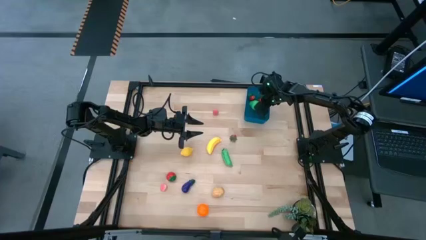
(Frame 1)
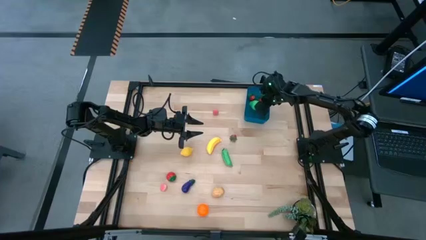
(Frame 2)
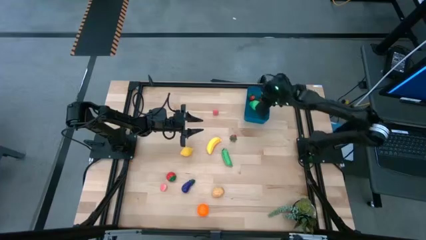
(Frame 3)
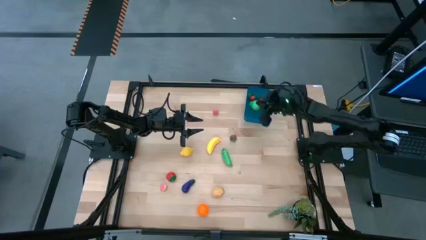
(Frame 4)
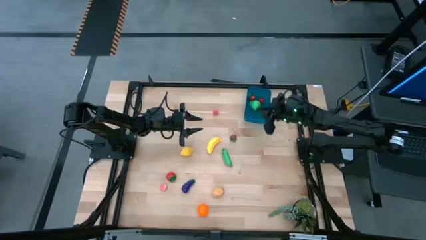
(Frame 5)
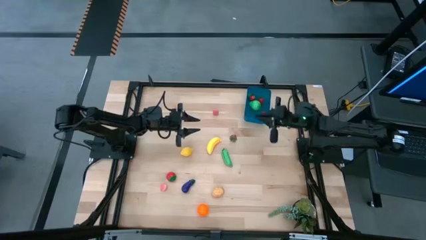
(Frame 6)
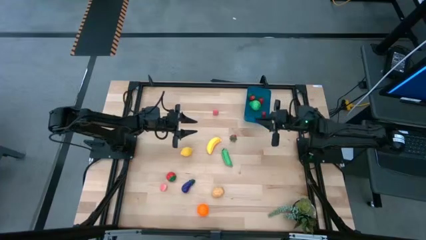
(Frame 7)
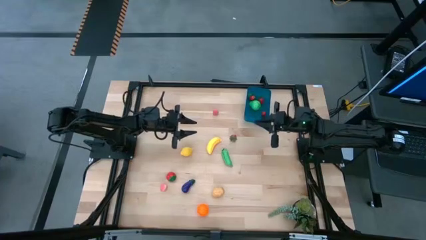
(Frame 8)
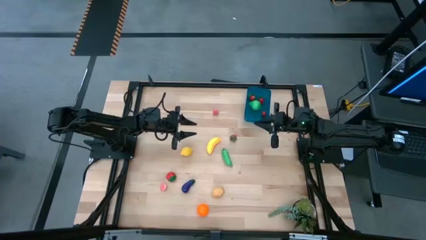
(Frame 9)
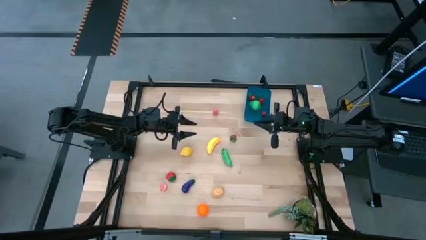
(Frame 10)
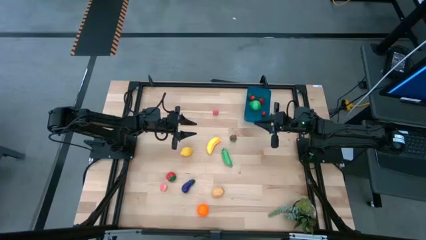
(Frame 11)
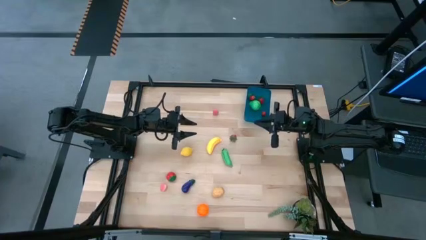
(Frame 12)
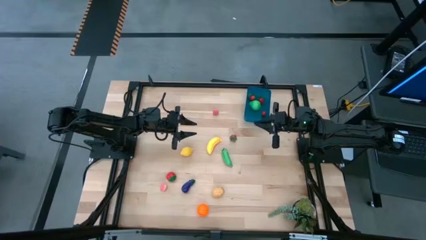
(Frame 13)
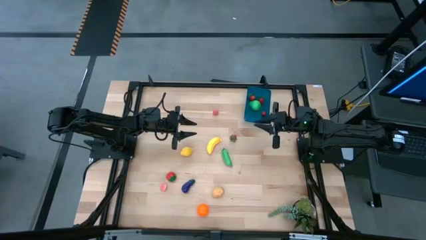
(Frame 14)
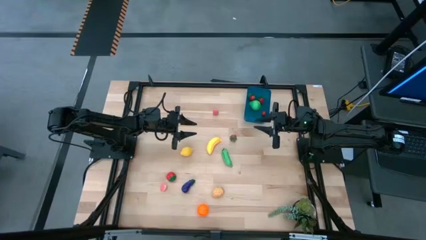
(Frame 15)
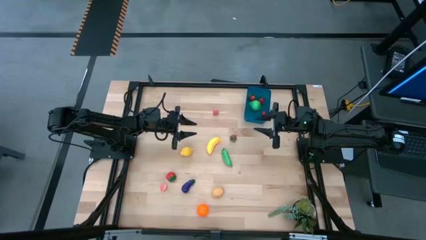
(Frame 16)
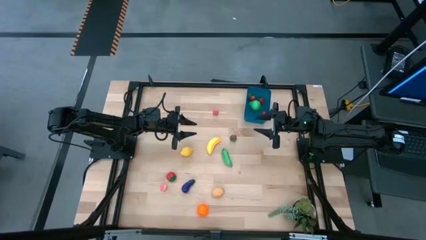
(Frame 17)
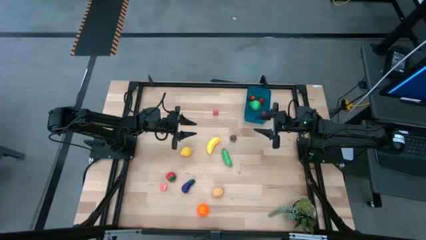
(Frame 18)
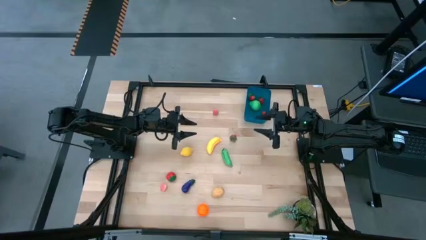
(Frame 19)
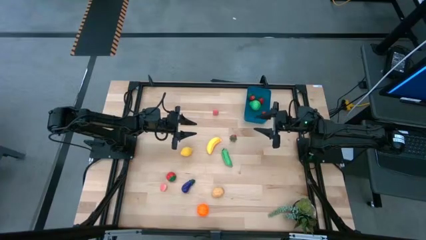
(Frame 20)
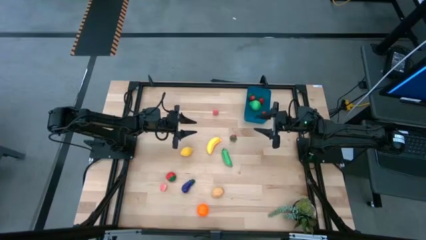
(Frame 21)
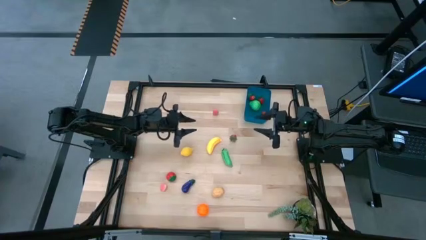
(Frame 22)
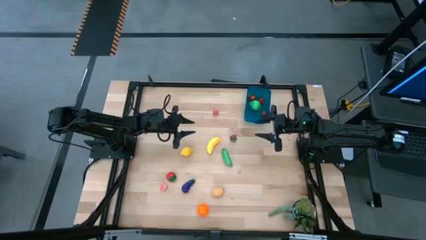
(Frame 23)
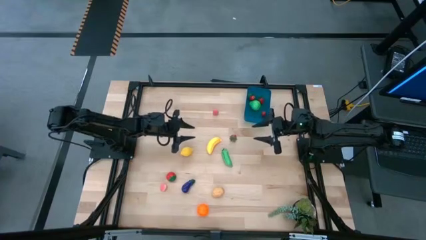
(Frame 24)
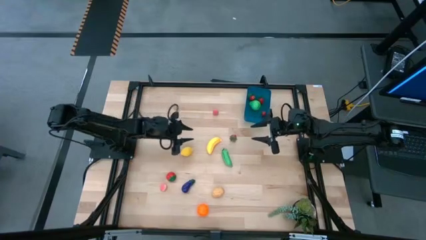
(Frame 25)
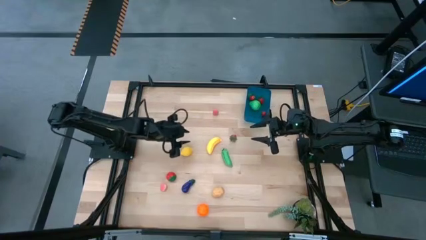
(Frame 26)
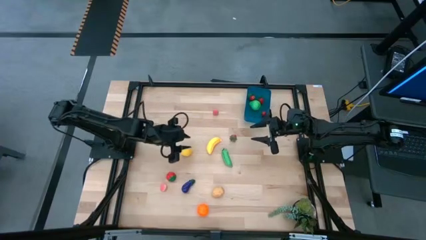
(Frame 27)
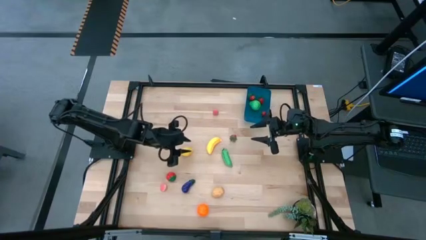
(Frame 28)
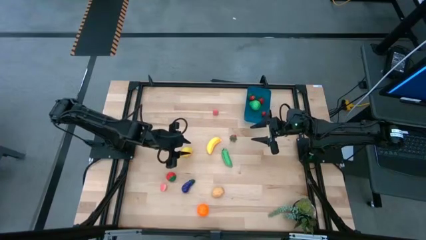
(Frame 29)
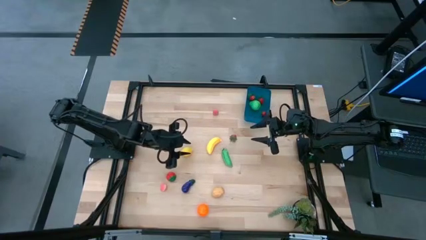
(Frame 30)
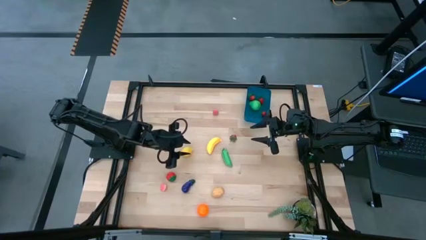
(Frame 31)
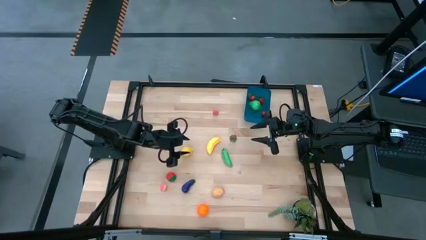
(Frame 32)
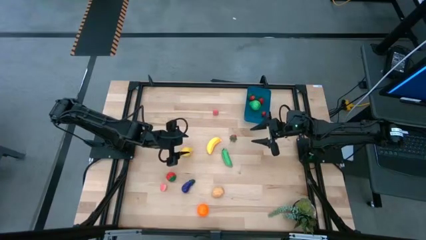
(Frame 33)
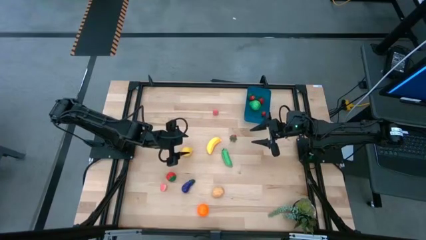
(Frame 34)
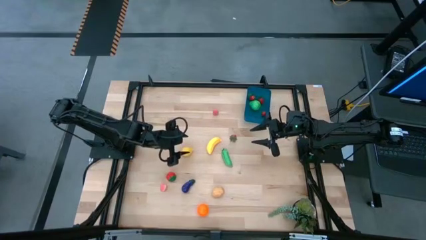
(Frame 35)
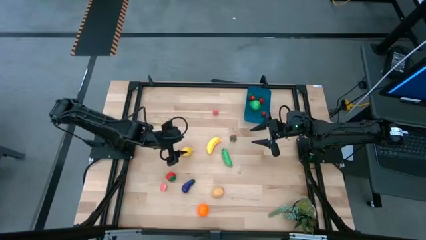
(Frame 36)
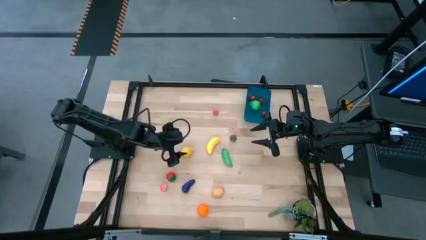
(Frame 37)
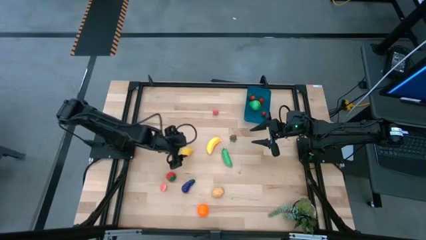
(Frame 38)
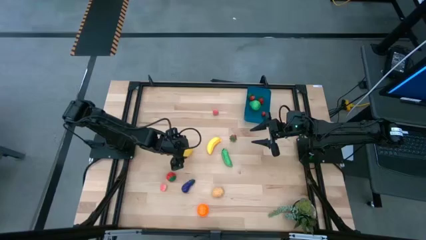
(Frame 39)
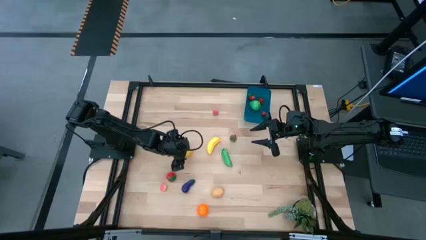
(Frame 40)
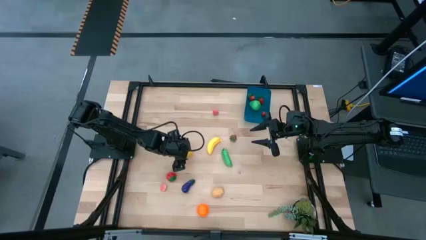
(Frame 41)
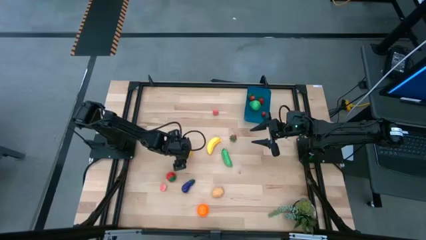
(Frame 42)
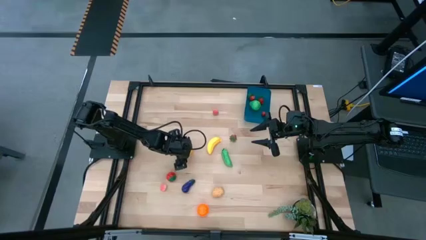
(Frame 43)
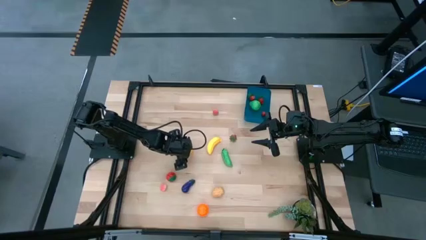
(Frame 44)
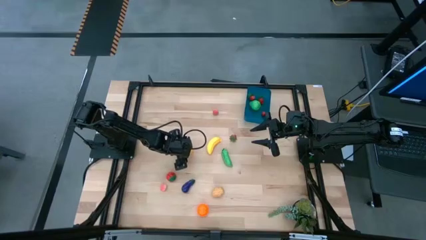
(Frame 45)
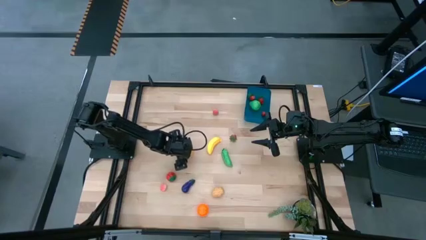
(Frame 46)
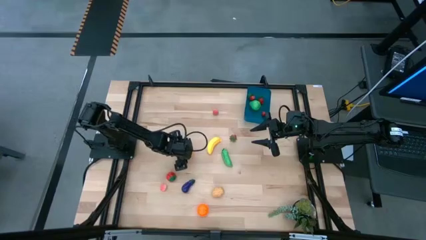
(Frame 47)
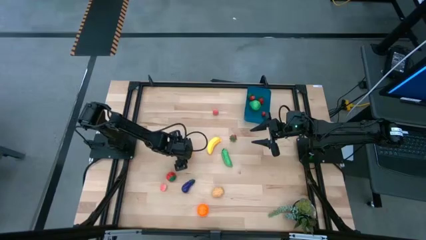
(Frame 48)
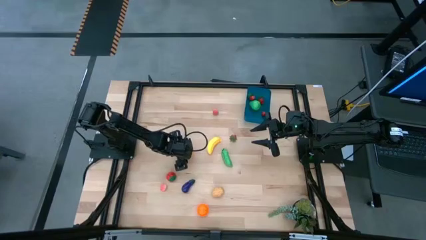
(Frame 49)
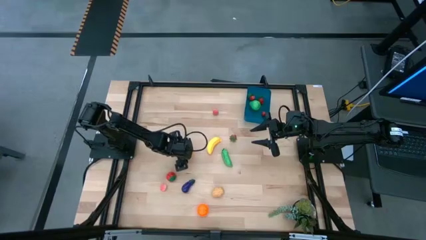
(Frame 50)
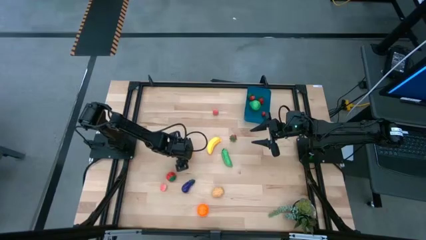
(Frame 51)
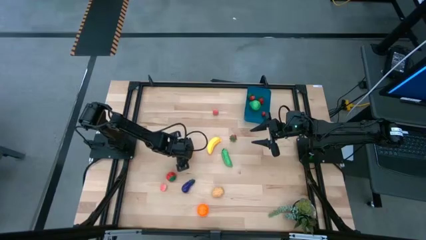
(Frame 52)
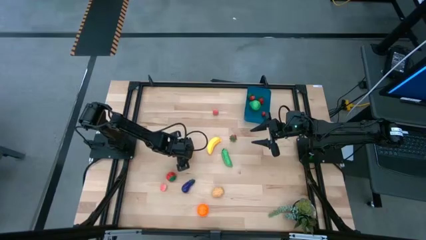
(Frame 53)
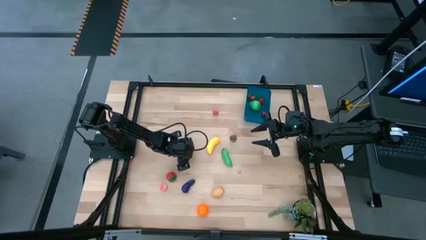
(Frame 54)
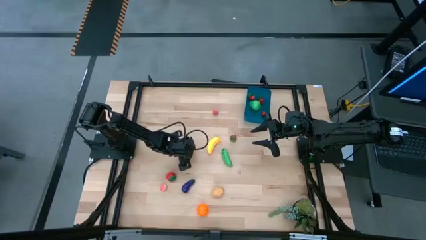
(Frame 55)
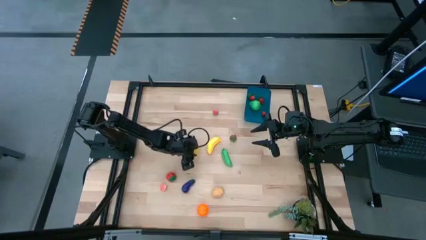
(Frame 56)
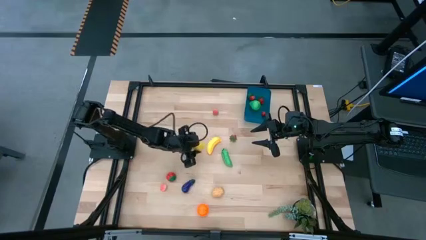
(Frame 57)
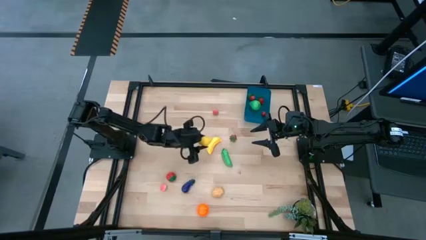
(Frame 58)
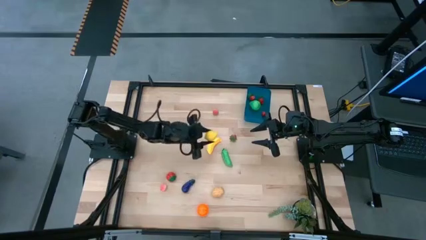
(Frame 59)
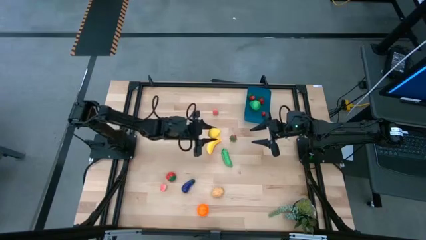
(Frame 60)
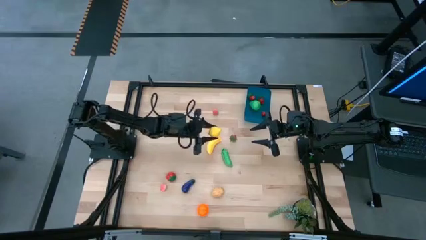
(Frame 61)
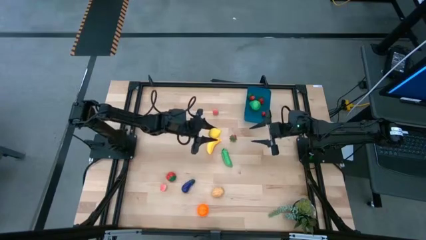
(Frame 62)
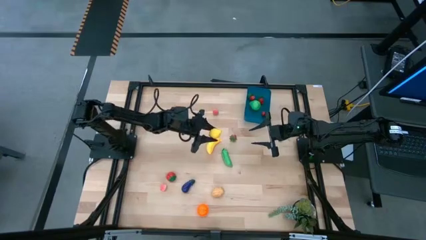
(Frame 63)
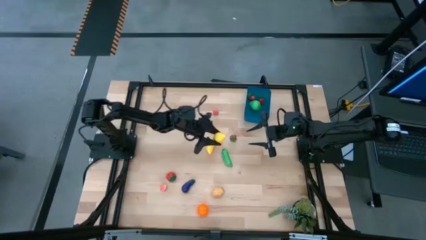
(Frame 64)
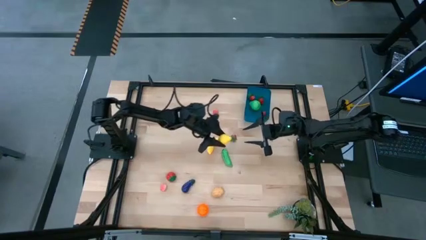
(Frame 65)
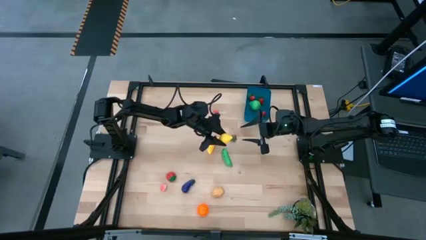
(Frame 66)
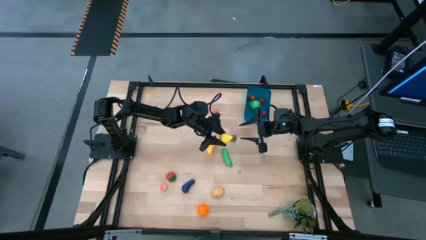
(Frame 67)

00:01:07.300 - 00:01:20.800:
Task: Pick and placing Produce into tupperware
Put the yellow lemon into the blue bin

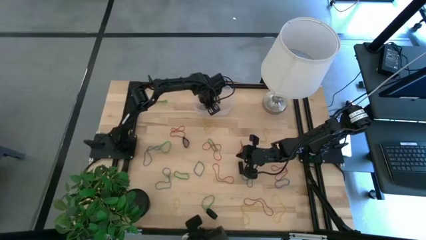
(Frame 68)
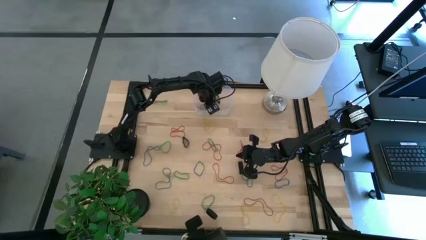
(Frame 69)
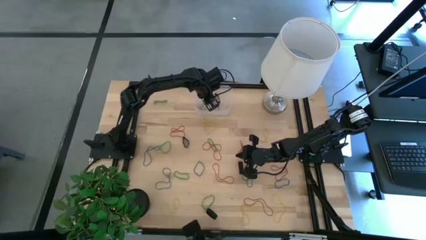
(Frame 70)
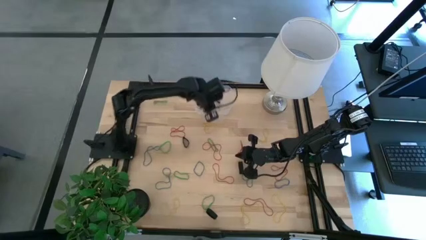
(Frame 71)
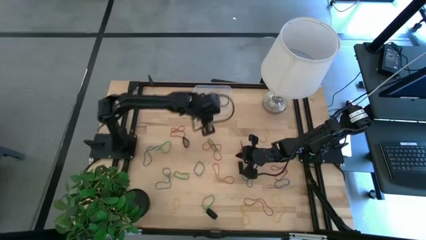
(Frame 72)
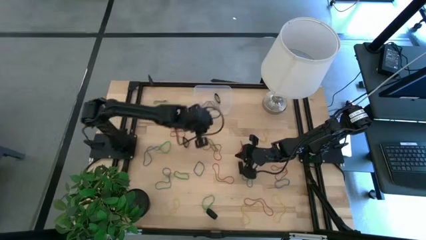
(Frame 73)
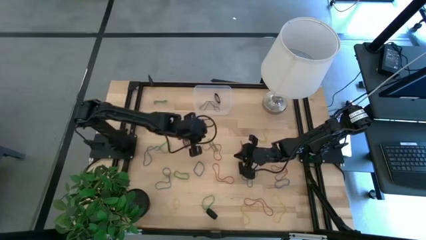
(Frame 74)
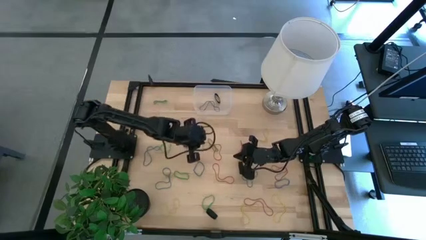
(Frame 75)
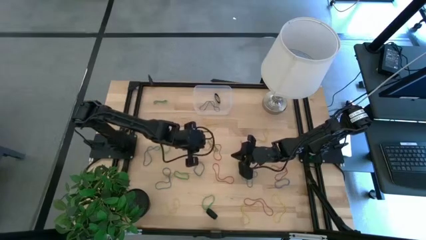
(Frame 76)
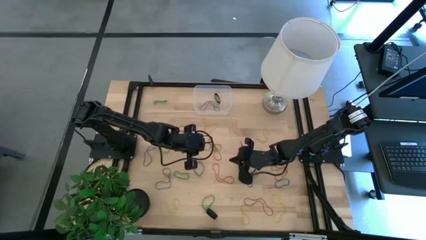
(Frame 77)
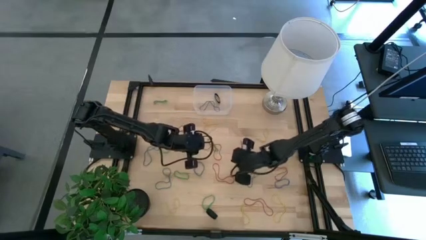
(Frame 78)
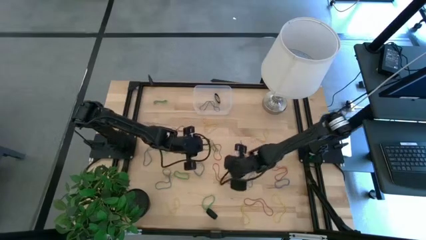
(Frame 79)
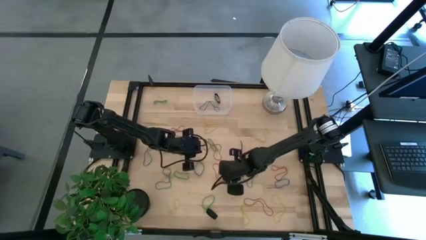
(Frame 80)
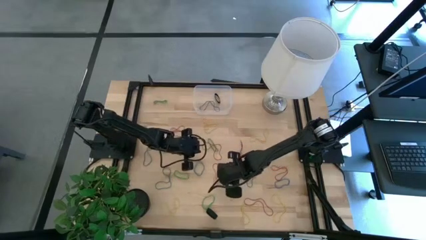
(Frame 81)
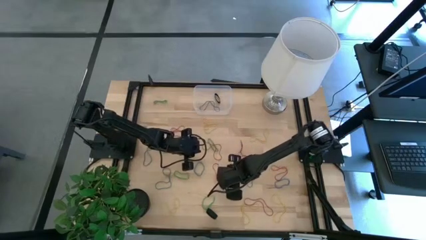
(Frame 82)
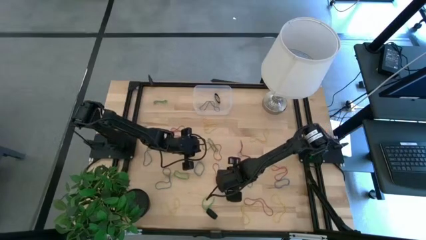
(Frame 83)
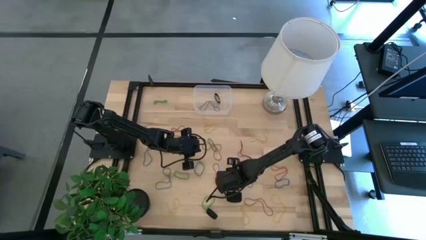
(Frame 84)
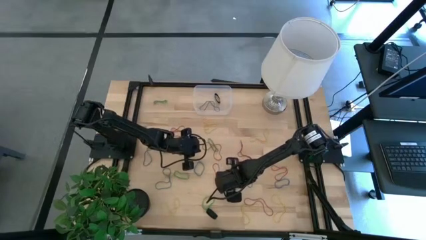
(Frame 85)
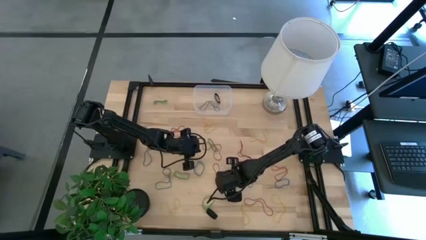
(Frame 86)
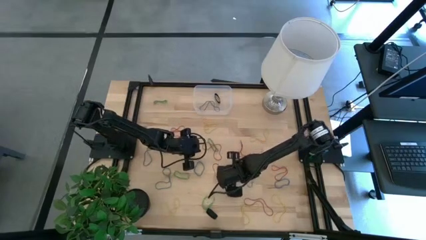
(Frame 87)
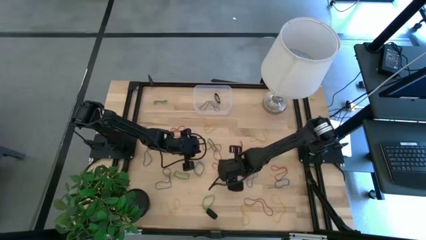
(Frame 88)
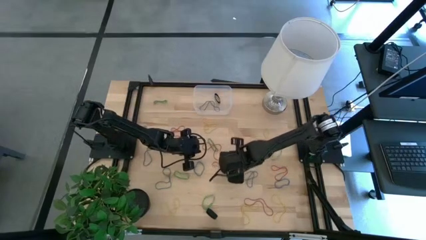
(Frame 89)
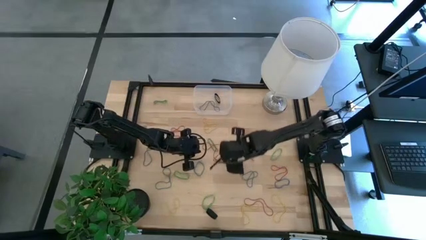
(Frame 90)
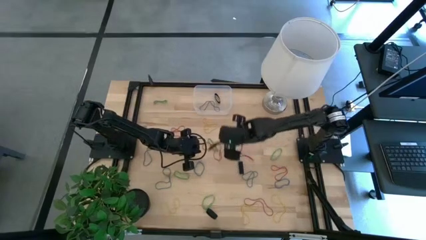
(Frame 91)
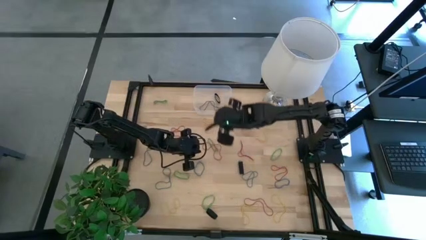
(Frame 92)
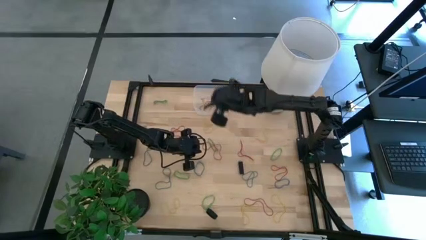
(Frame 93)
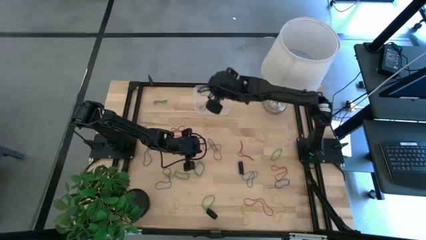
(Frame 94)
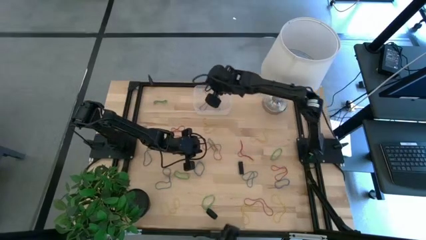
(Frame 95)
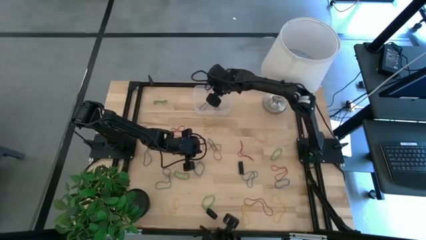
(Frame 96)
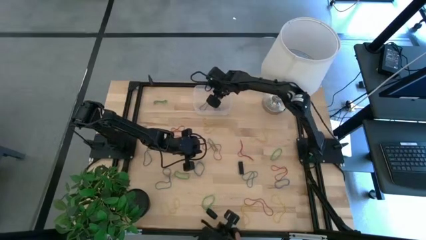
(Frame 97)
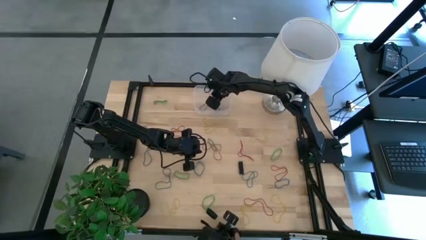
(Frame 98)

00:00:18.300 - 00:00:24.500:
Task: Pick and place rubber bands into bin
Put the red rubber band into the transparent bin
